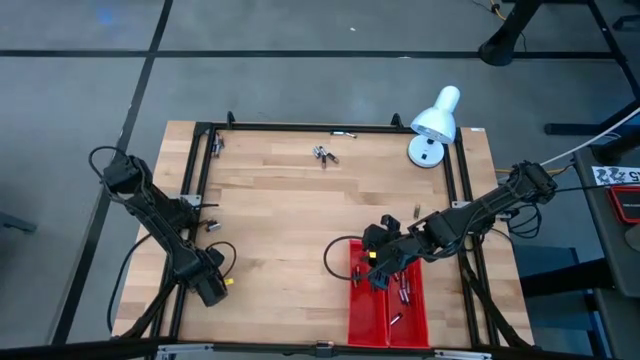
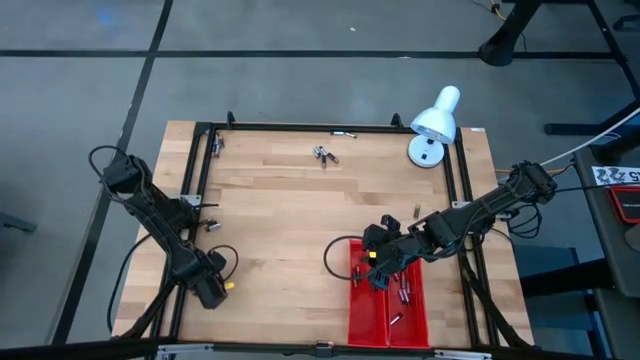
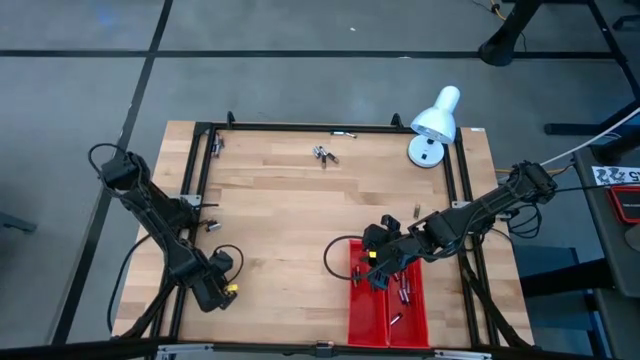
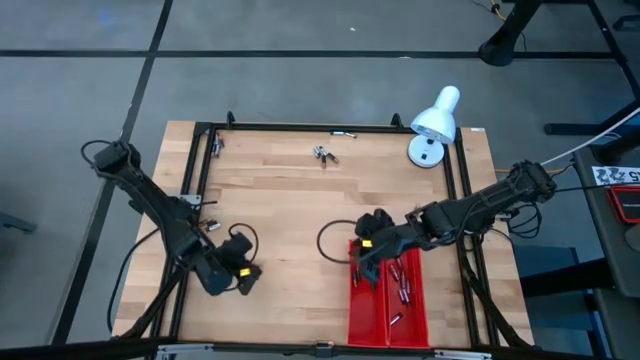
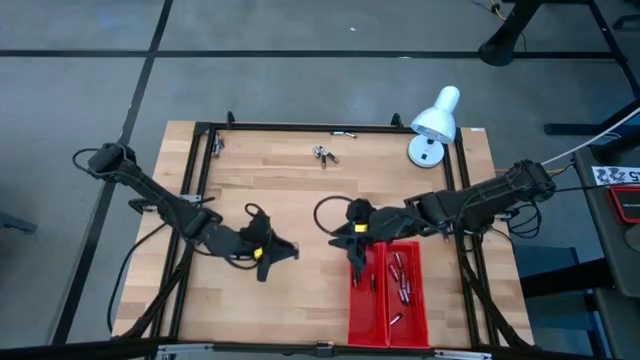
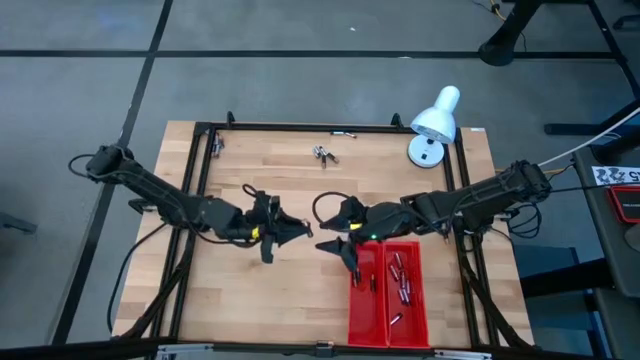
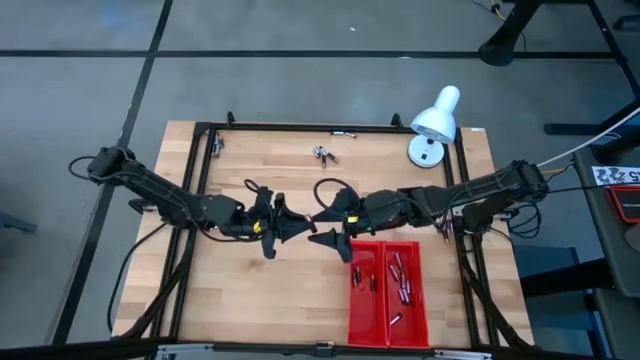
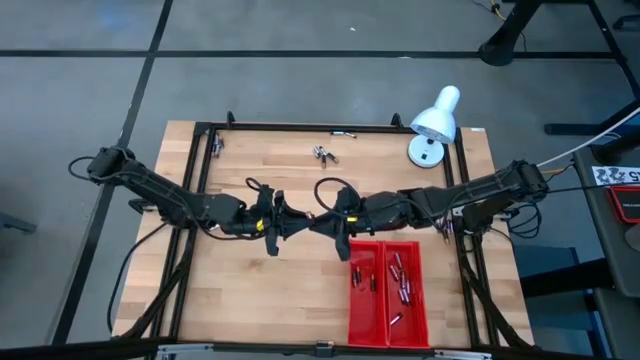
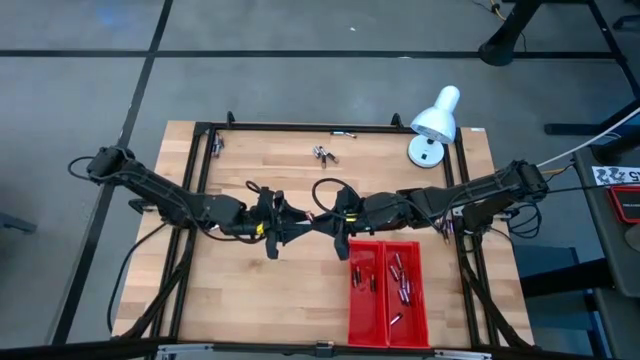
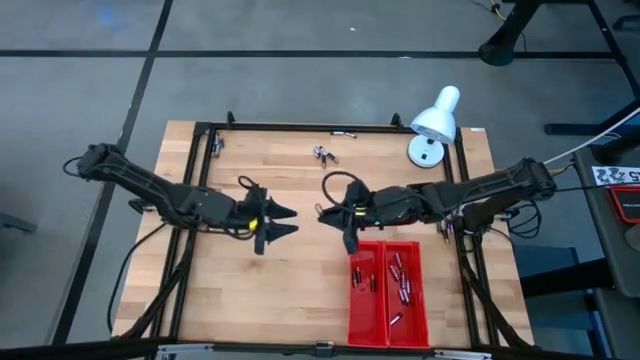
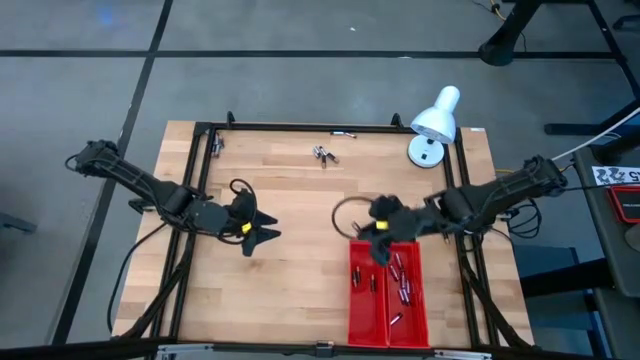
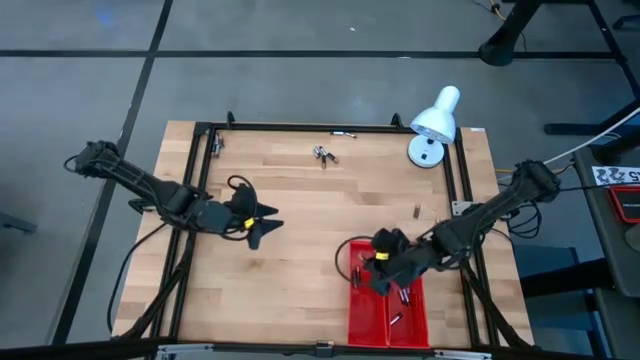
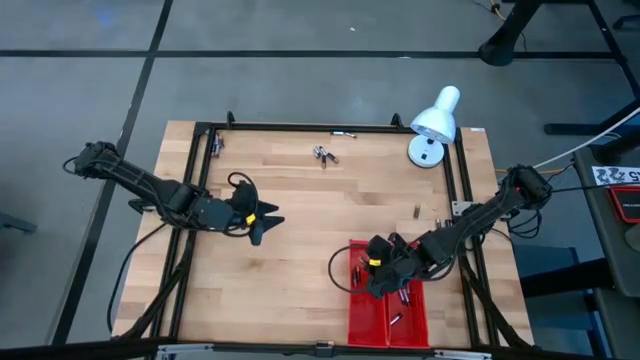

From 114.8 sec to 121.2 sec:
Task: Sort batteries
Put the black battery into the left red bin

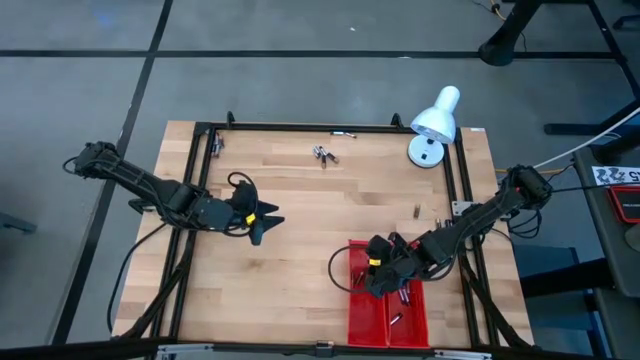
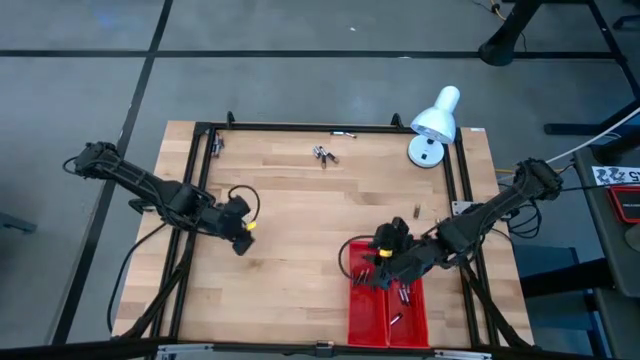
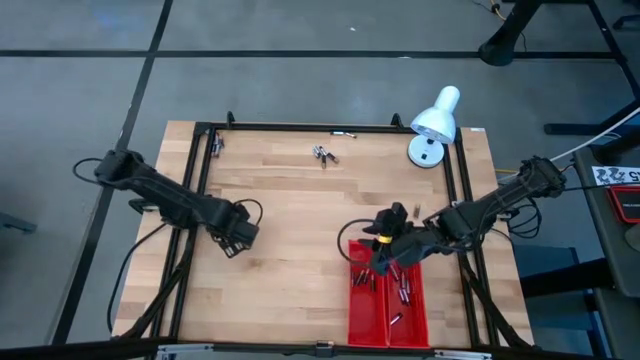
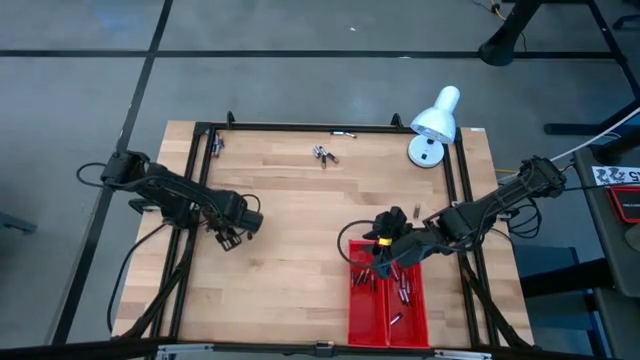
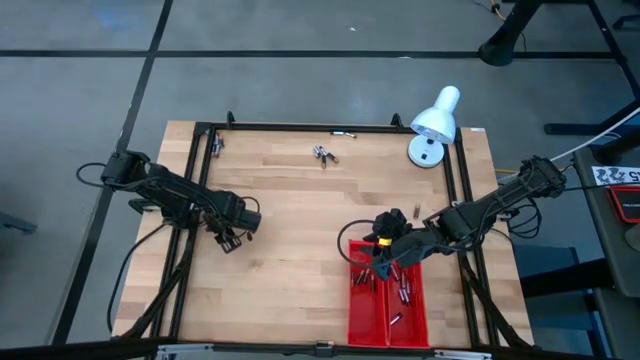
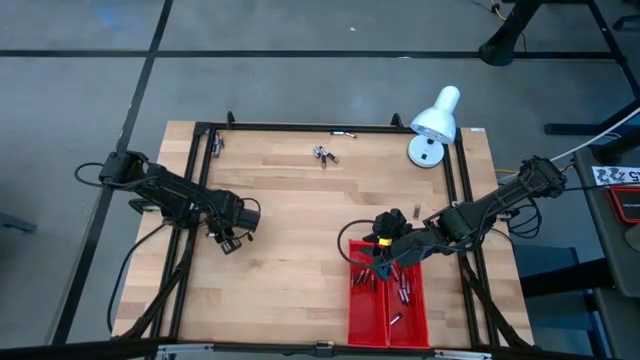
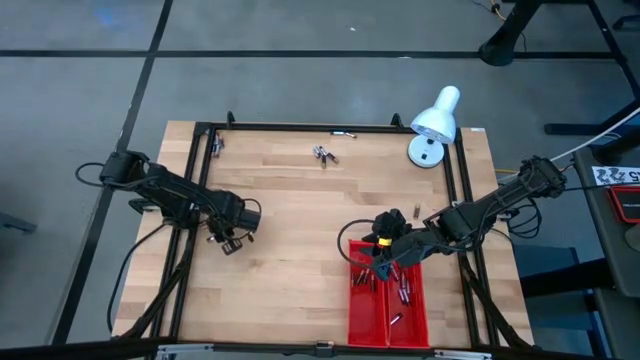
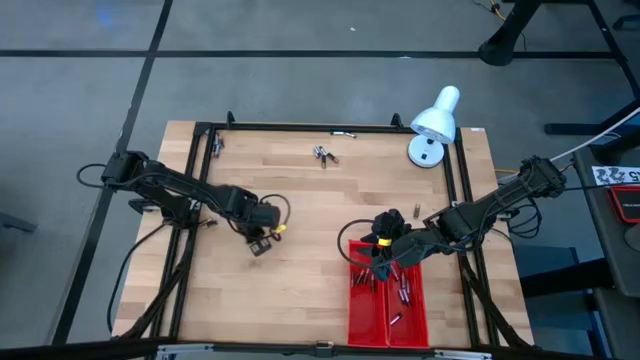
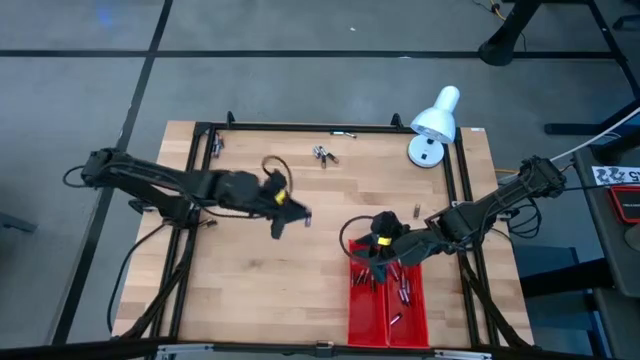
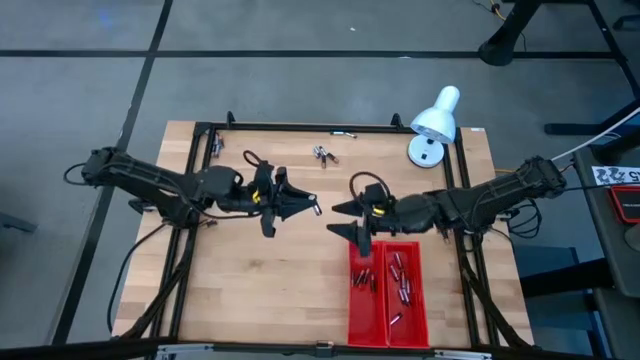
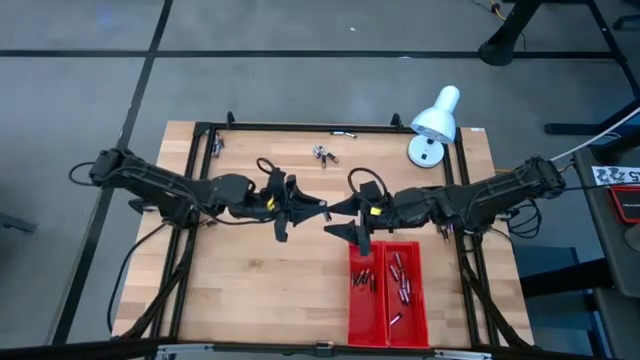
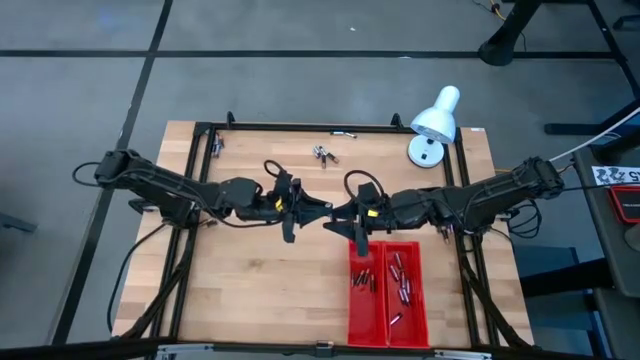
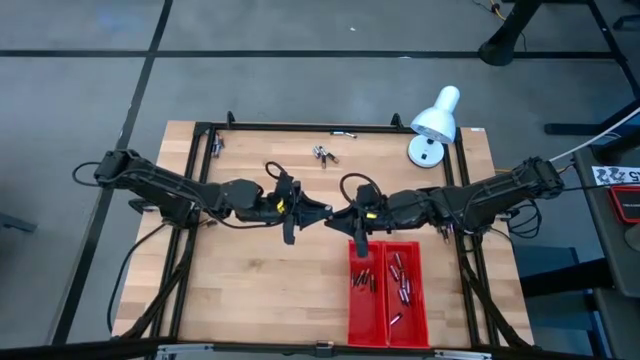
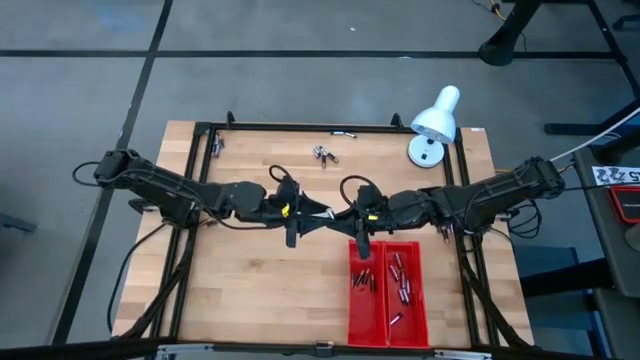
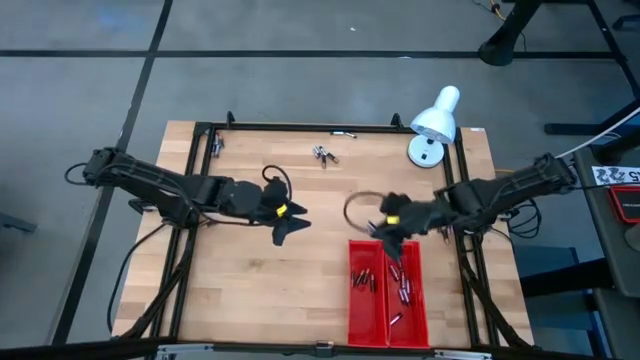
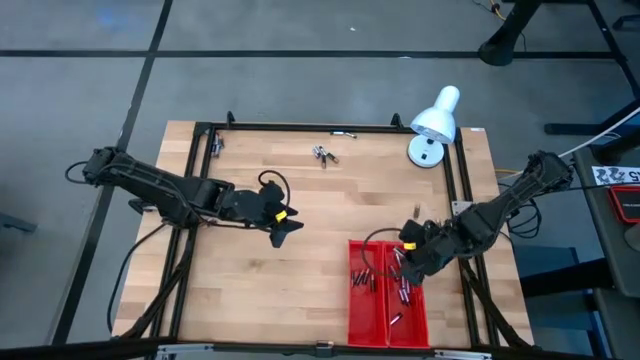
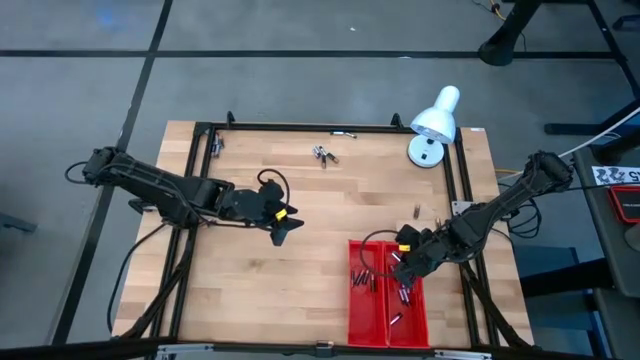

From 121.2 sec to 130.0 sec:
Put the silver battery into the right red bin

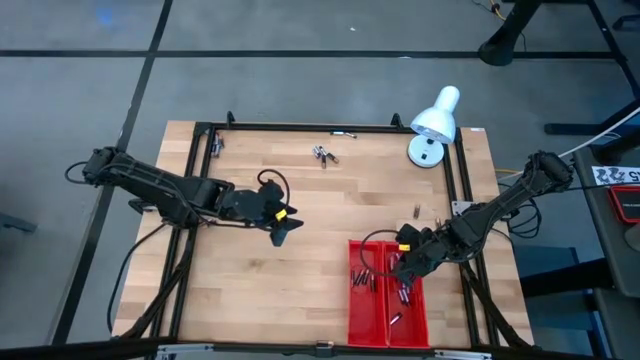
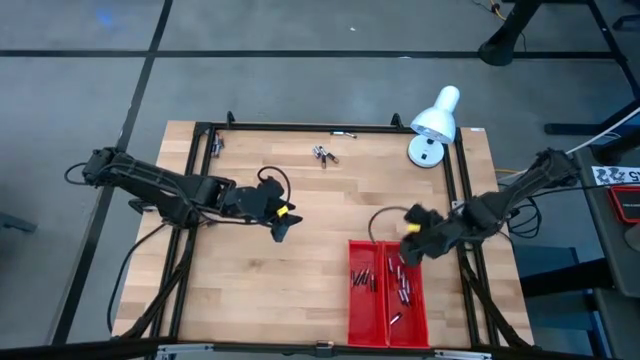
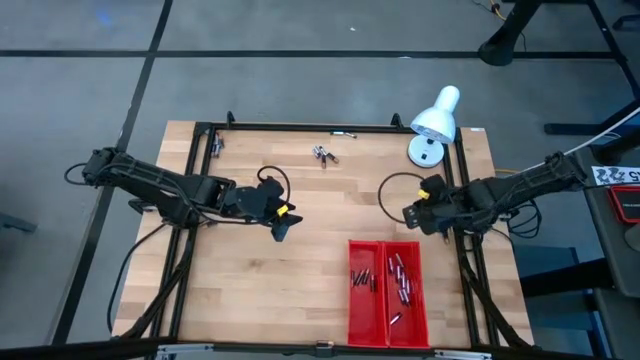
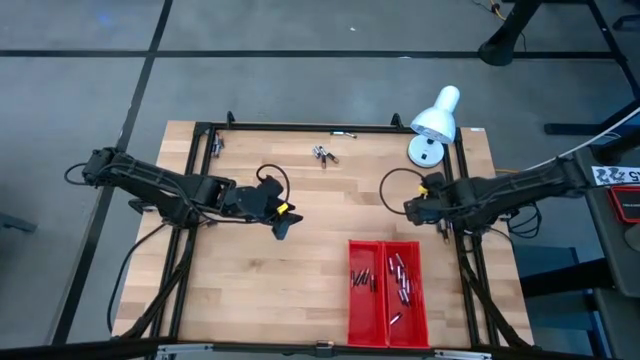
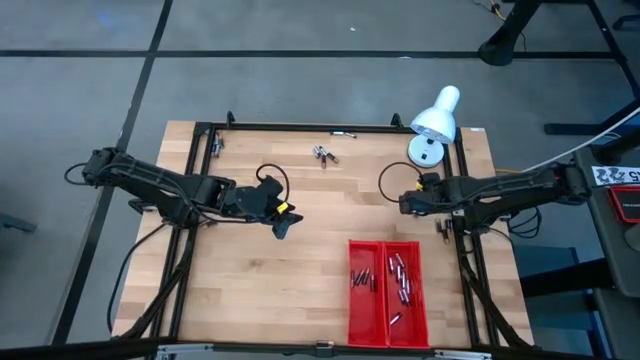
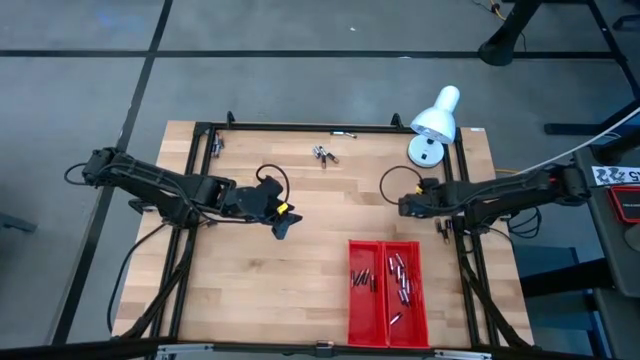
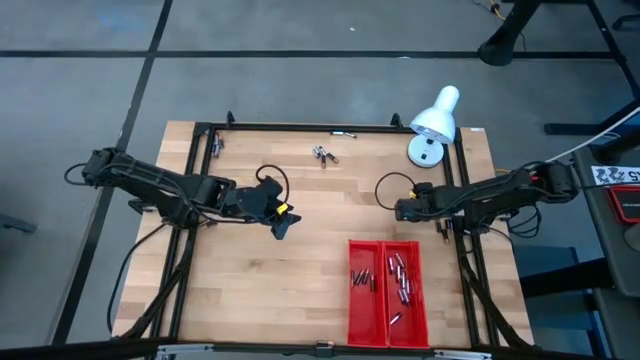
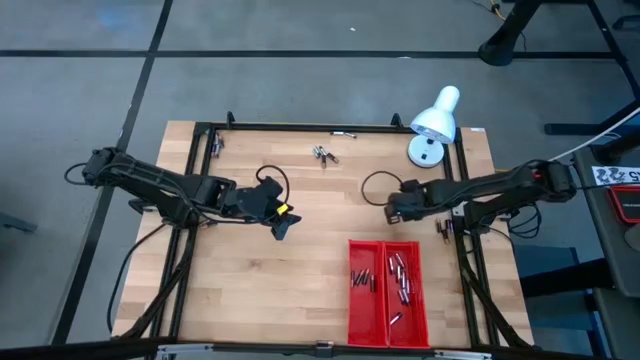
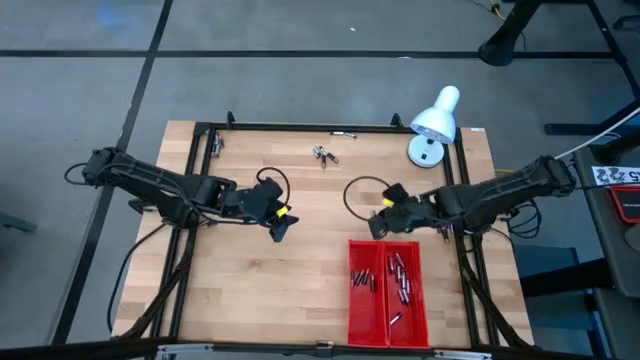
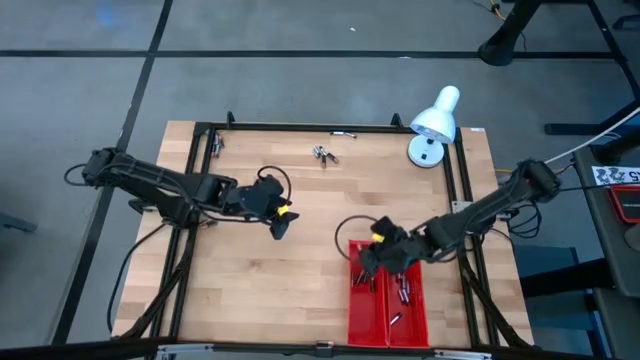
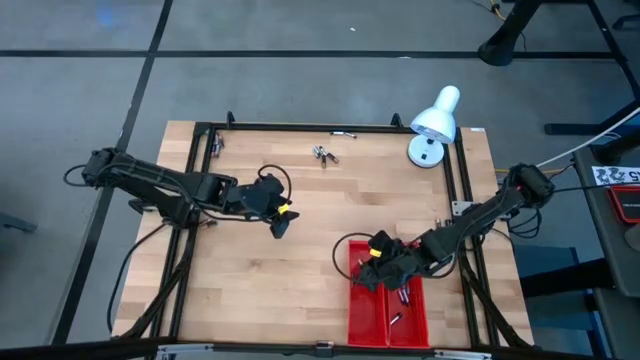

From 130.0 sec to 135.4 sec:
Put the black battery into the left red bin

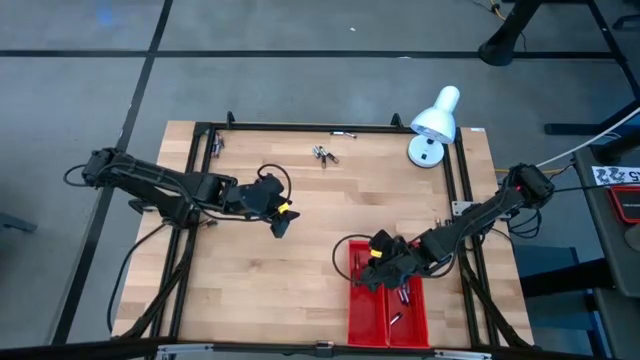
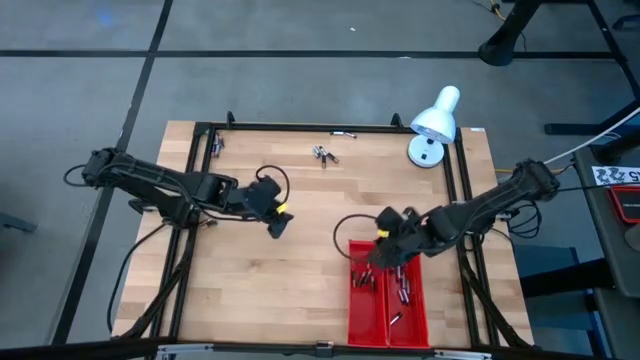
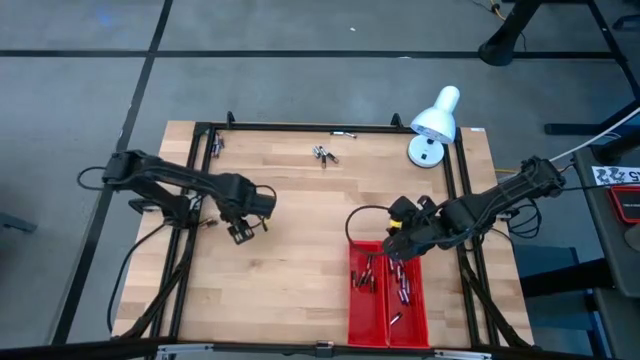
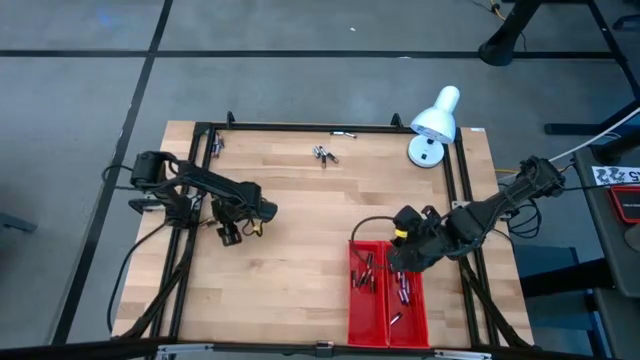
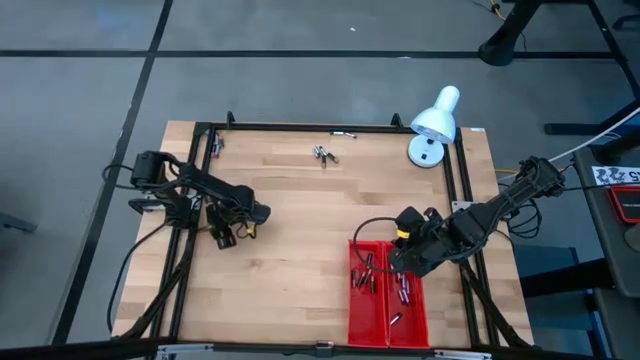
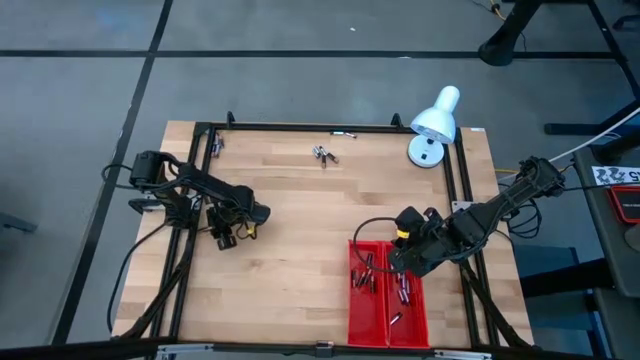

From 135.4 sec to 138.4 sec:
Put the black battery into the left red bin
